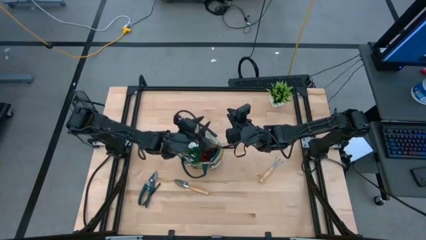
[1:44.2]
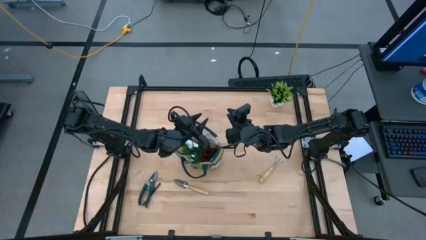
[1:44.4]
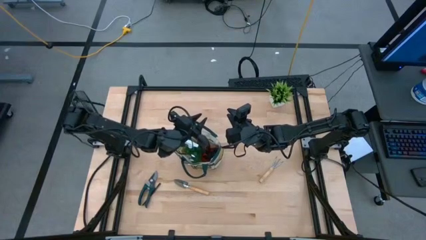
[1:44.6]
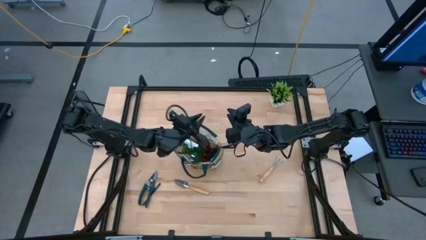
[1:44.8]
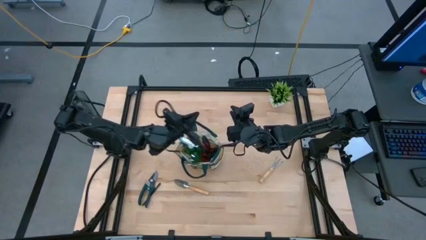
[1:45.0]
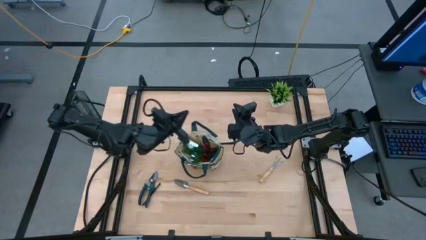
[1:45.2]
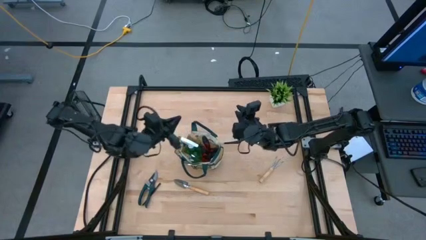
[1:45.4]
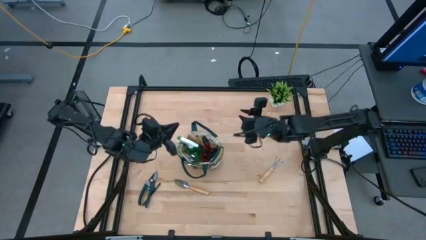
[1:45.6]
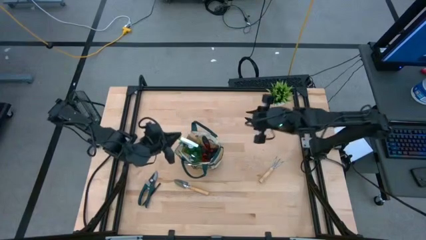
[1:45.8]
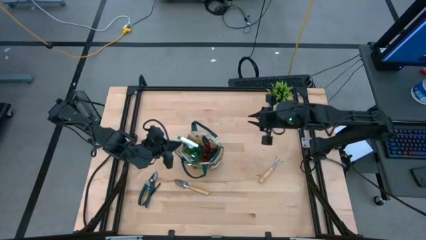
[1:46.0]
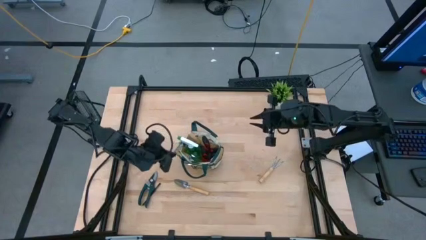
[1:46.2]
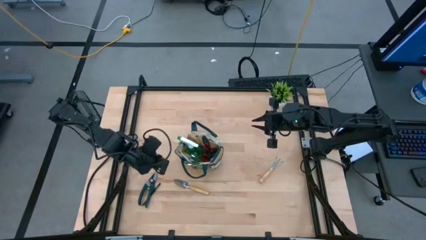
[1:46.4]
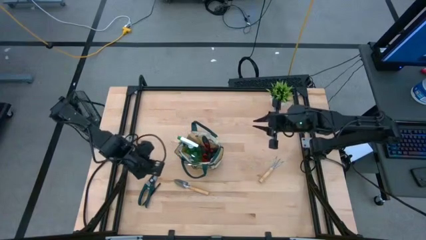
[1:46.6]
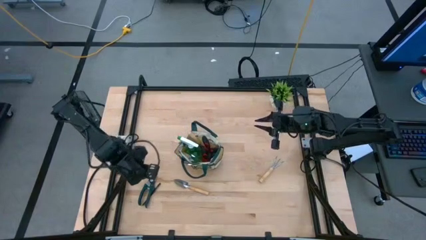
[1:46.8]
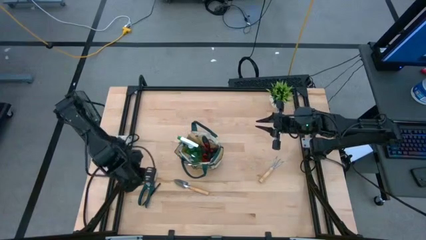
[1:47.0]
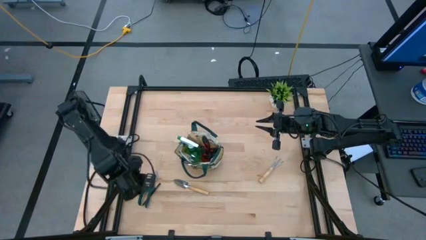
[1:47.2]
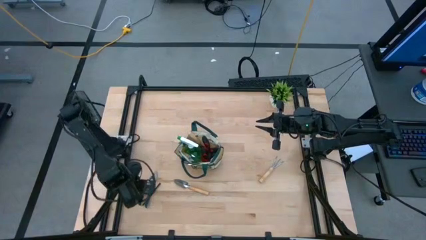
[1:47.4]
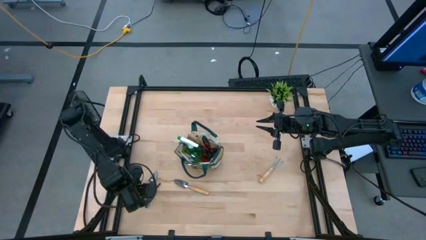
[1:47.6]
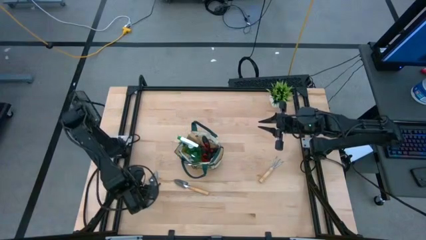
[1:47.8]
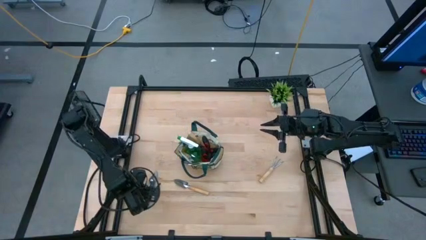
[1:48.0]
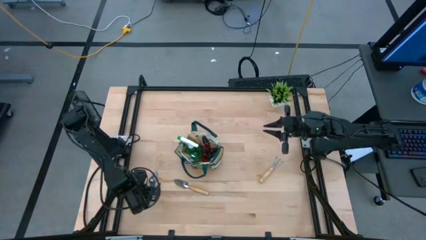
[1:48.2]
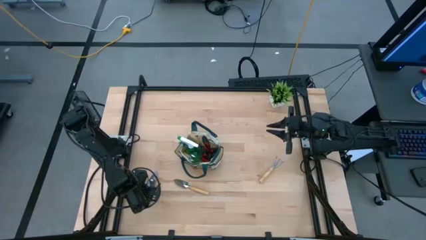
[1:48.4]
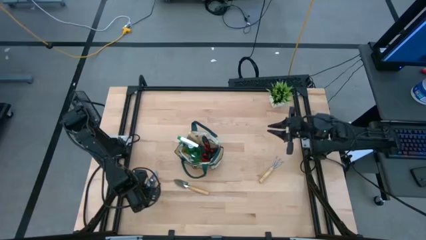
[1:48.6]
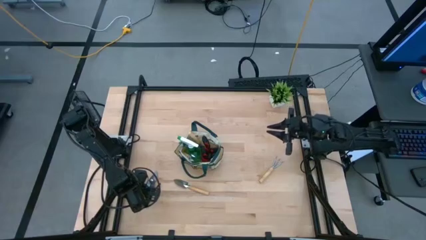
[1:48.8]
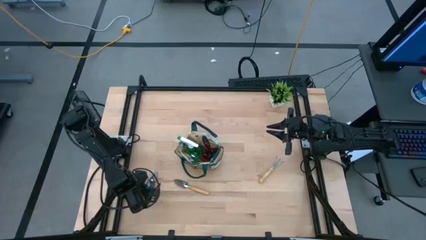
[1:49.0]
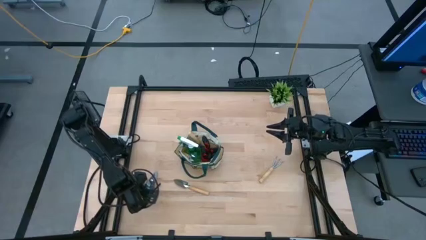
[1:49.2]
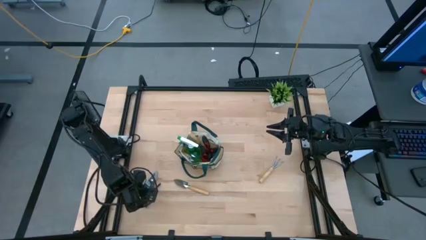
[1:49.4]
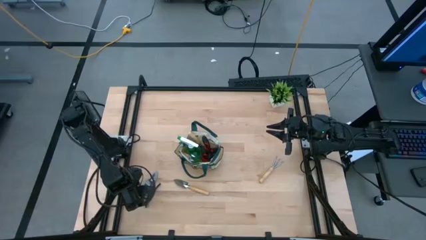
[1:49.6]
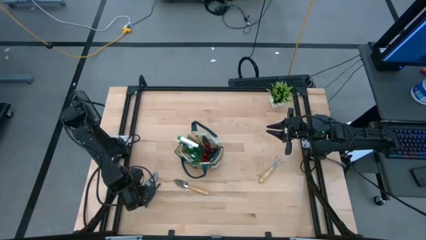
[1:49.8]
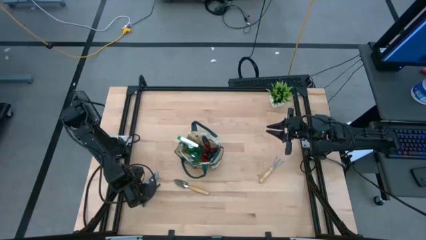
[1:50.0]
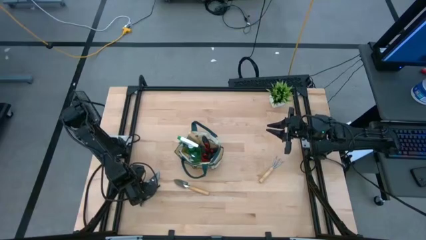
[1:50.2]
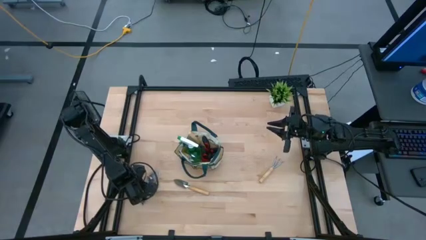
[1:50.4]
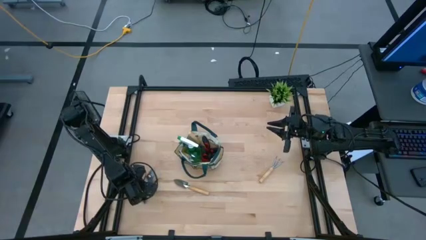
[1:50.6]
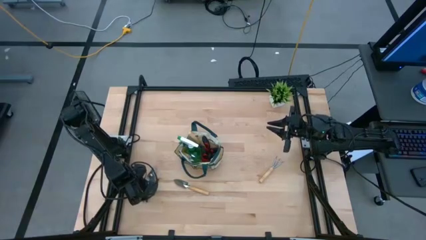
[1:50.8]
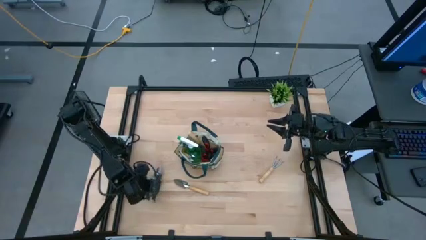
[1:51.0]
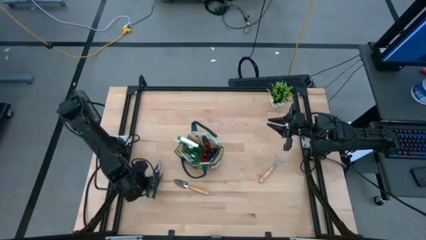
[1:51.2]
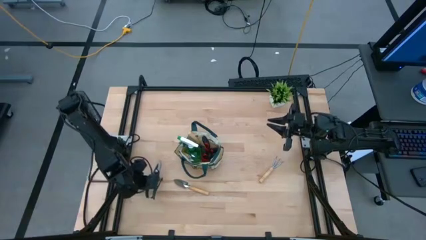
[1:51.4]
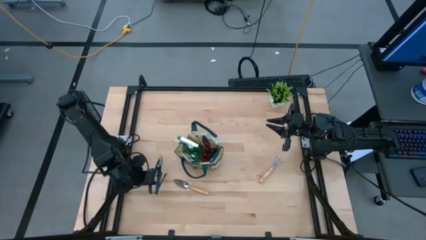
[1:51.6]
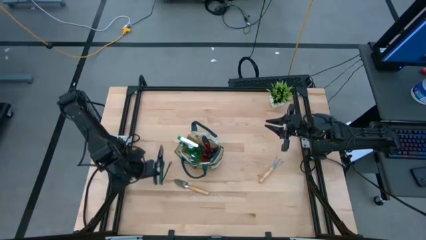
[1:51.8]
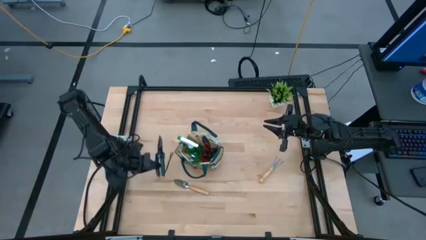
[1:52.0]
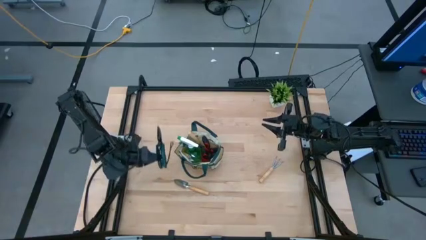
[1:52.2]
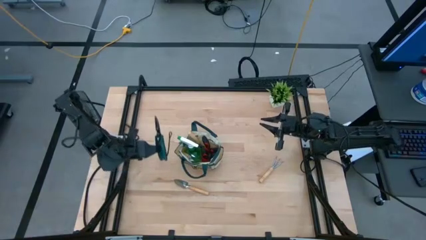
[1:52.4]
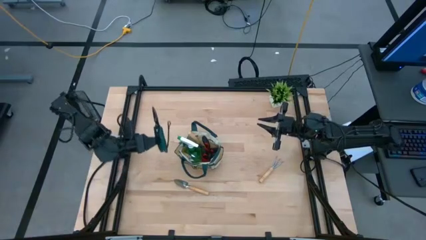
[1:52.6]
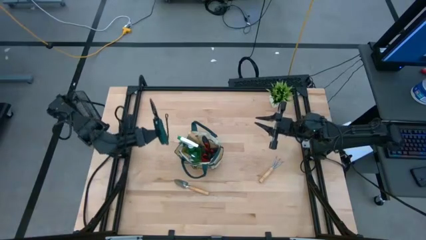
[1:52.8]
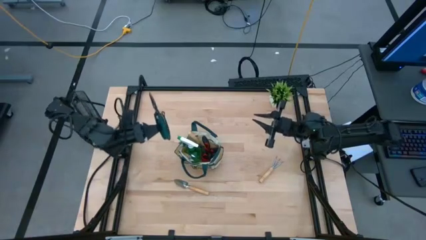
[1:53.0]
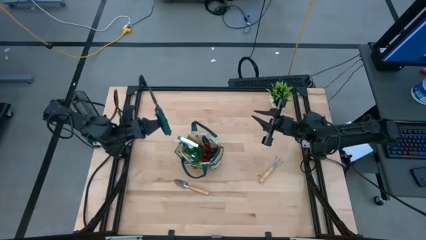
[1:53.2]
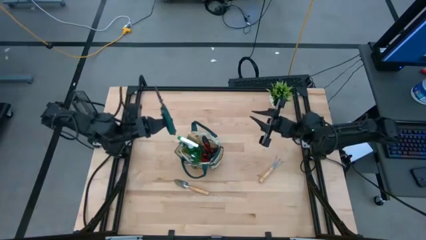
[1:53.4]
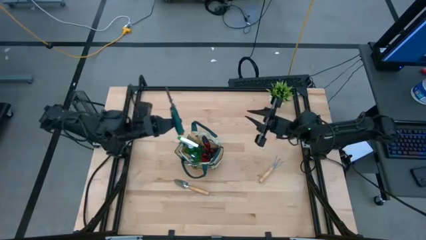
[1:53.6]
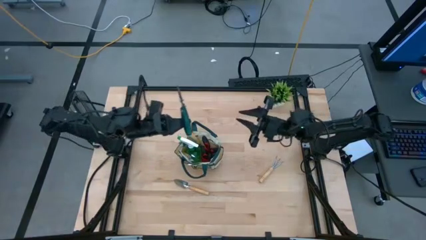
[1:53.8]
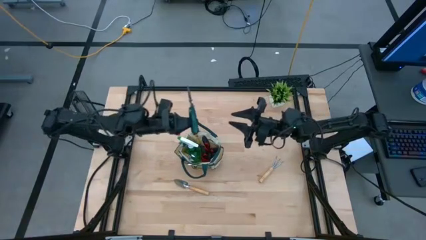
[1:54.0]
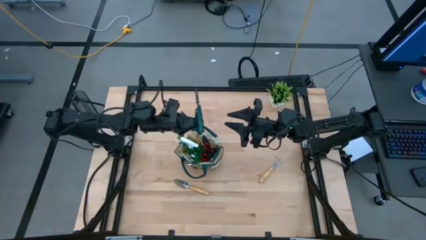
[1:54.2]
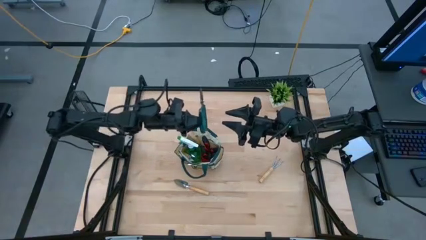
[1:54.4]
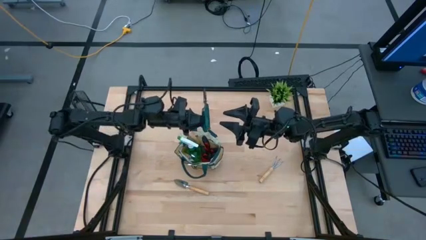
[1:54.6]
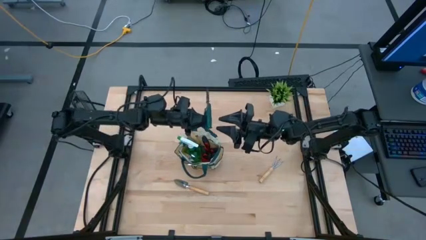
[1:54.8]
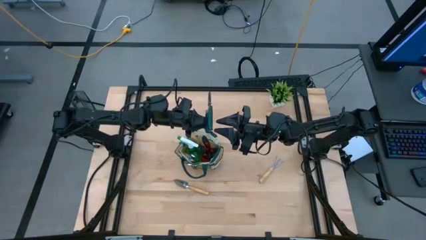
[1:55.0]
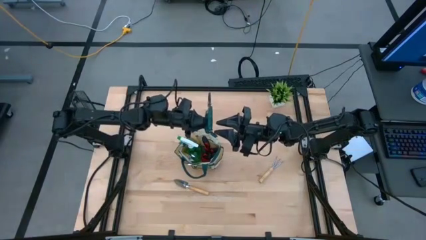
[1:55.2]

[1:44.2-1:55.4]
Task: Pick & Place Garden tools in Gardening bag
Put the green shear scissors into the gardening bag
